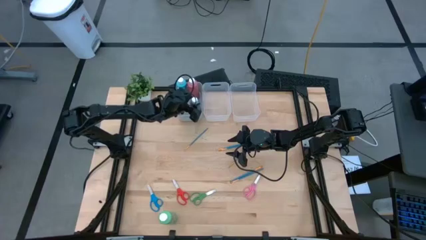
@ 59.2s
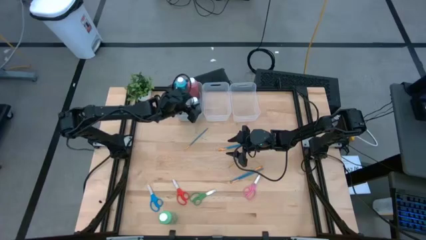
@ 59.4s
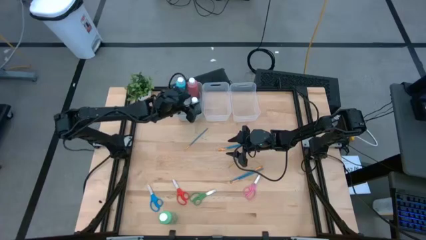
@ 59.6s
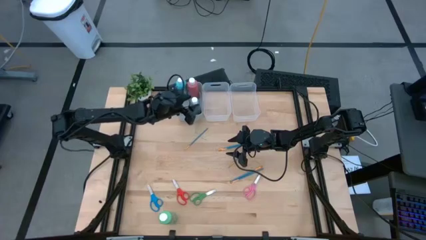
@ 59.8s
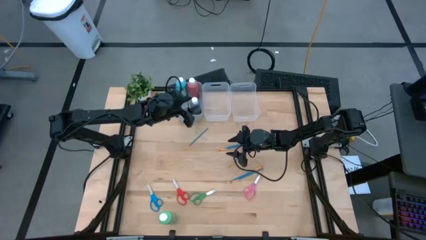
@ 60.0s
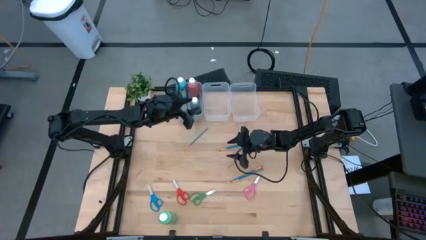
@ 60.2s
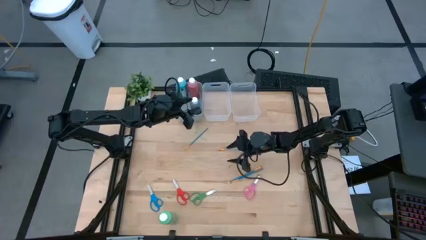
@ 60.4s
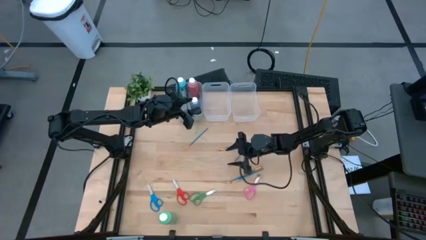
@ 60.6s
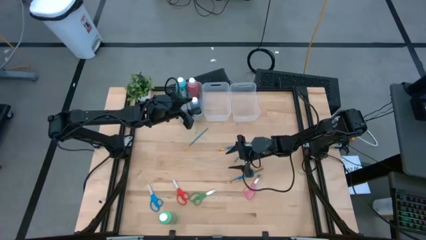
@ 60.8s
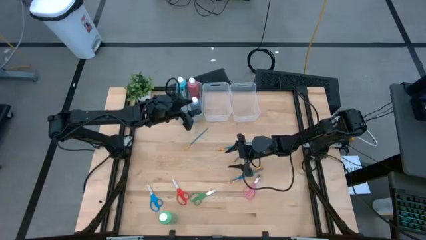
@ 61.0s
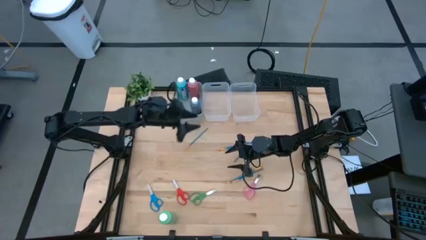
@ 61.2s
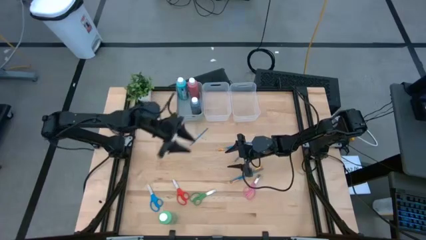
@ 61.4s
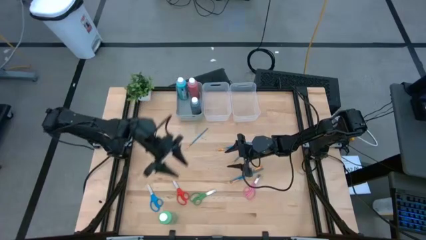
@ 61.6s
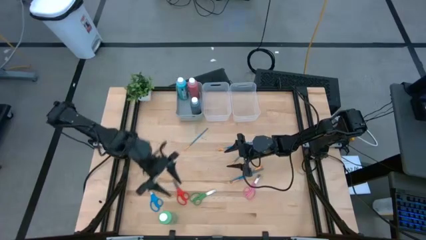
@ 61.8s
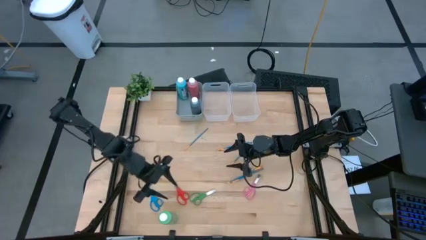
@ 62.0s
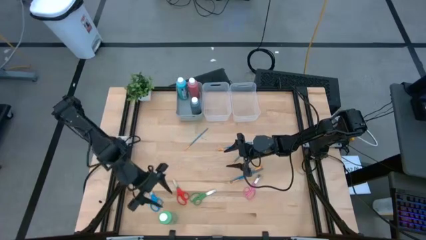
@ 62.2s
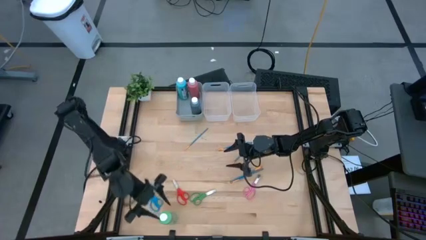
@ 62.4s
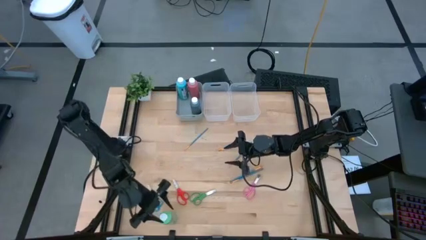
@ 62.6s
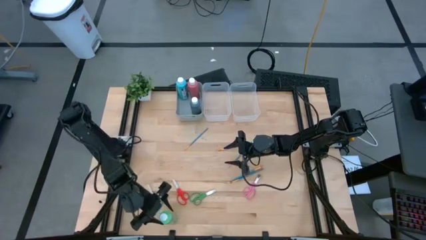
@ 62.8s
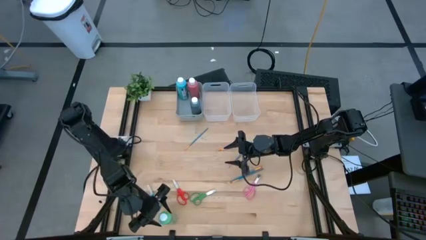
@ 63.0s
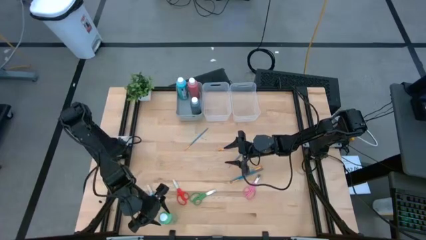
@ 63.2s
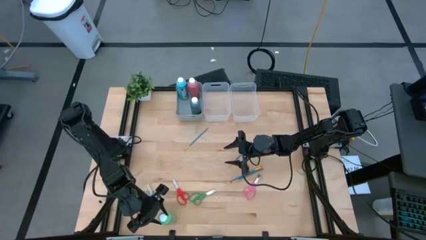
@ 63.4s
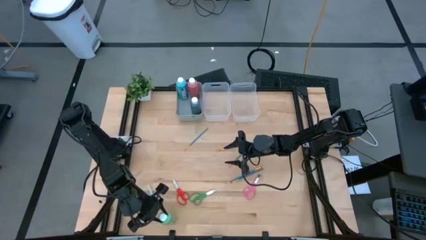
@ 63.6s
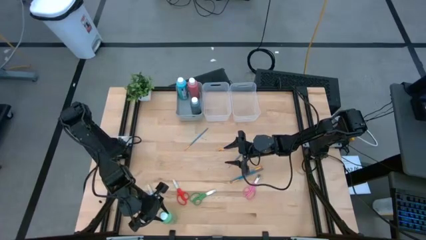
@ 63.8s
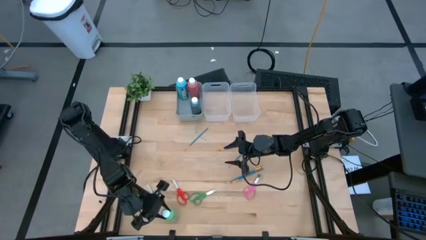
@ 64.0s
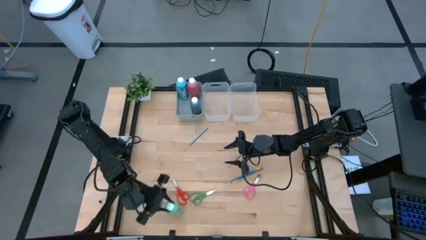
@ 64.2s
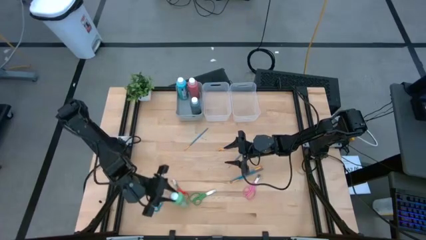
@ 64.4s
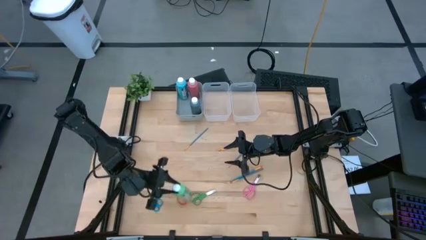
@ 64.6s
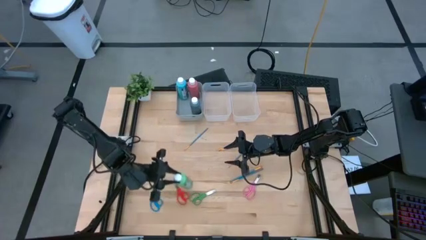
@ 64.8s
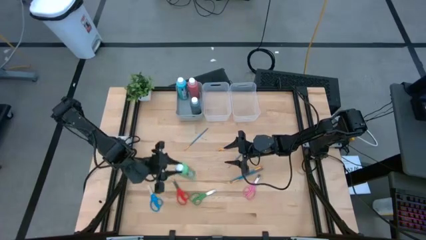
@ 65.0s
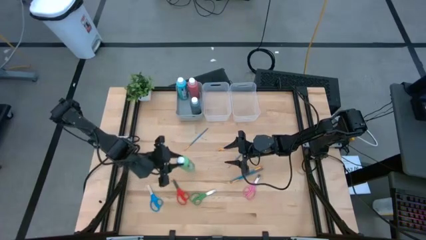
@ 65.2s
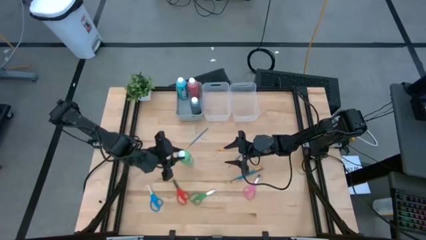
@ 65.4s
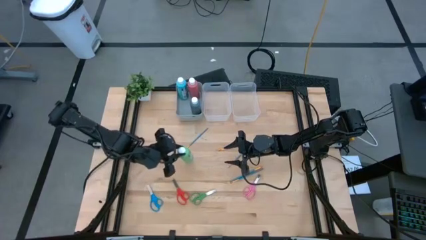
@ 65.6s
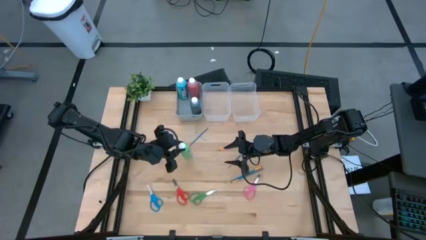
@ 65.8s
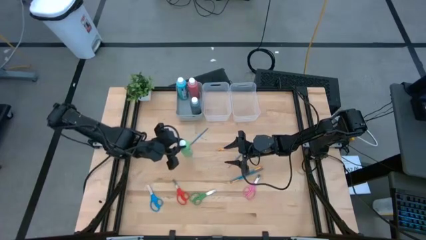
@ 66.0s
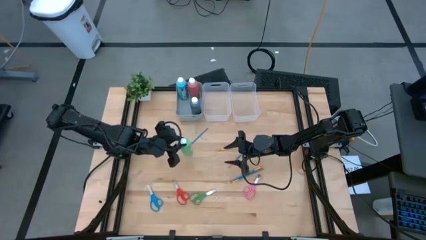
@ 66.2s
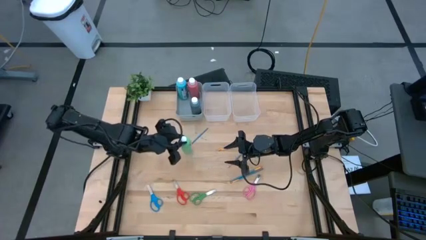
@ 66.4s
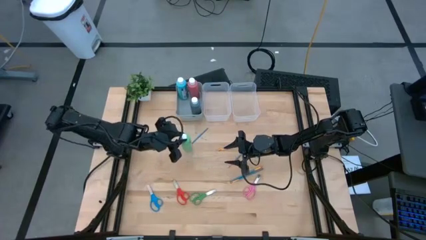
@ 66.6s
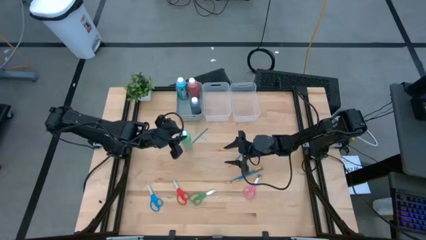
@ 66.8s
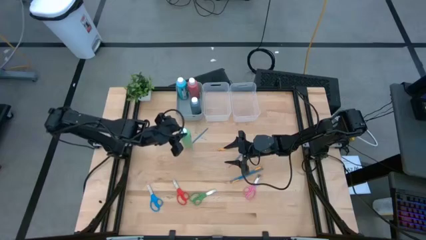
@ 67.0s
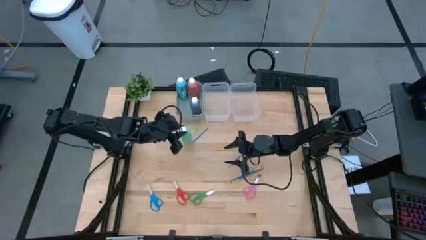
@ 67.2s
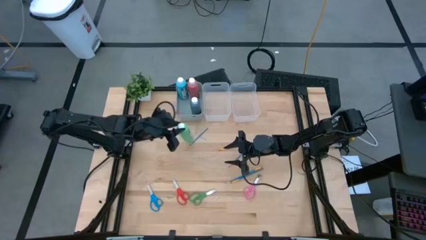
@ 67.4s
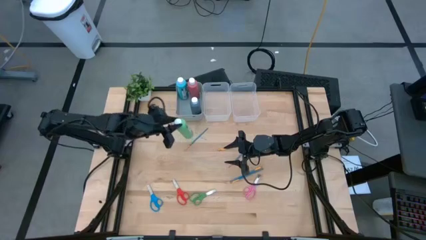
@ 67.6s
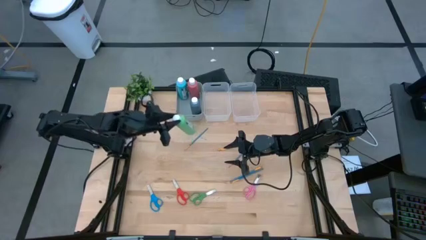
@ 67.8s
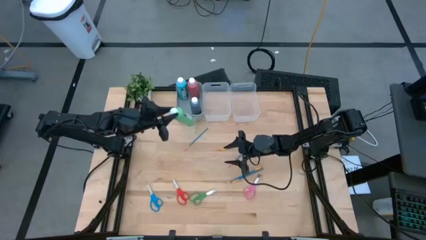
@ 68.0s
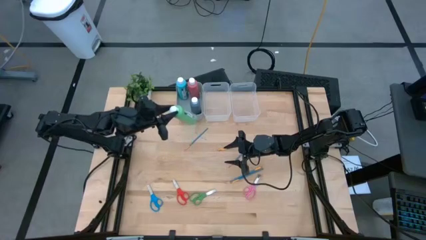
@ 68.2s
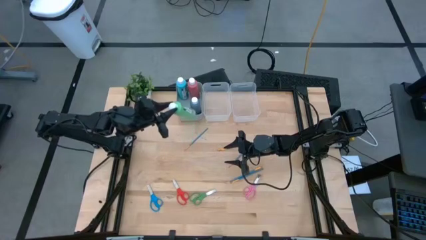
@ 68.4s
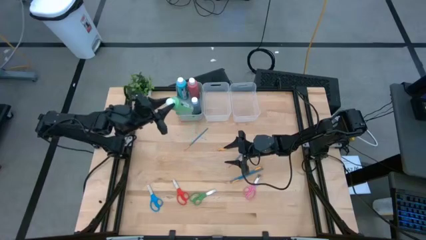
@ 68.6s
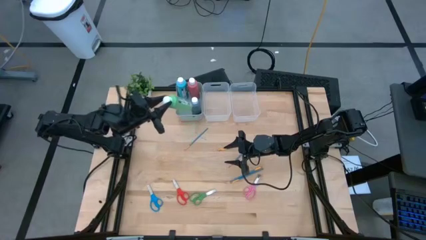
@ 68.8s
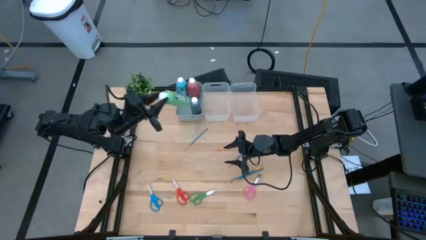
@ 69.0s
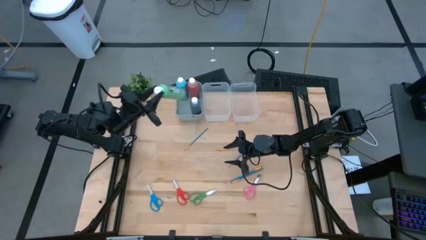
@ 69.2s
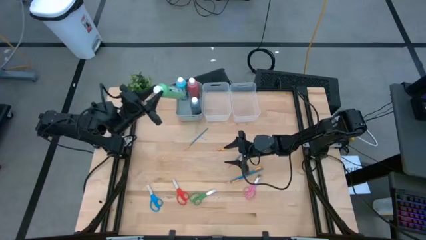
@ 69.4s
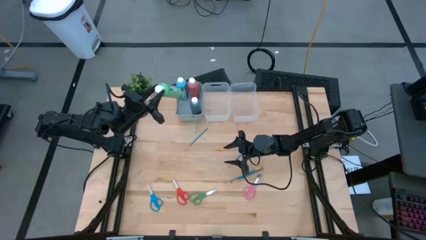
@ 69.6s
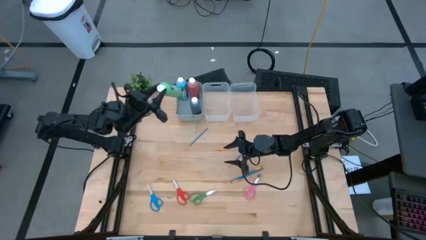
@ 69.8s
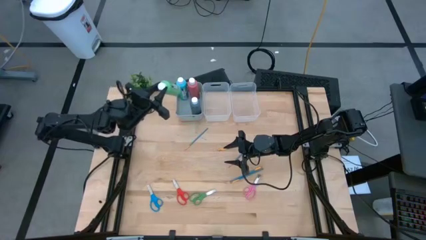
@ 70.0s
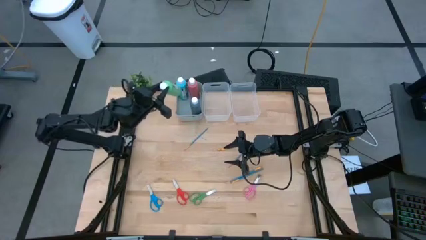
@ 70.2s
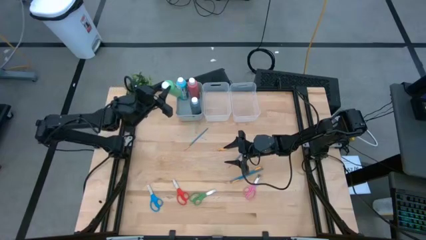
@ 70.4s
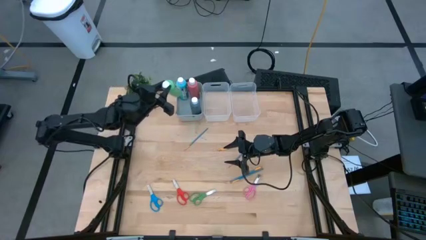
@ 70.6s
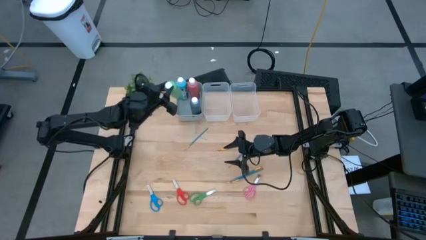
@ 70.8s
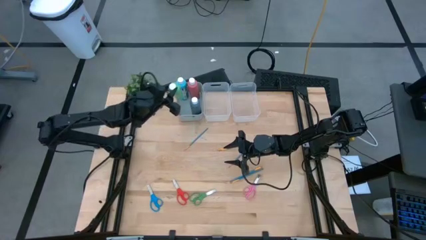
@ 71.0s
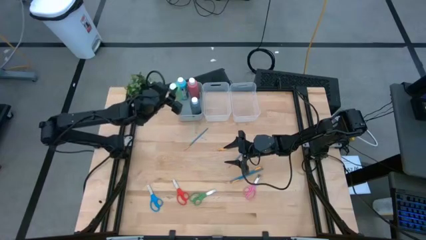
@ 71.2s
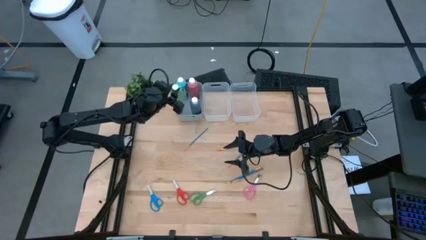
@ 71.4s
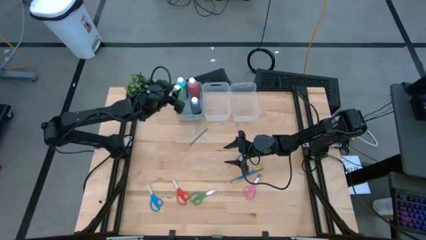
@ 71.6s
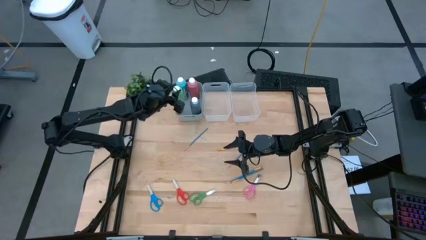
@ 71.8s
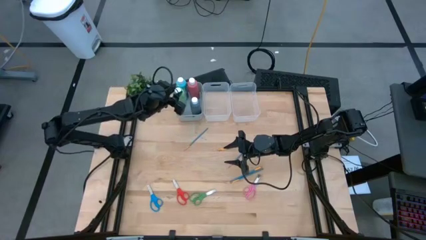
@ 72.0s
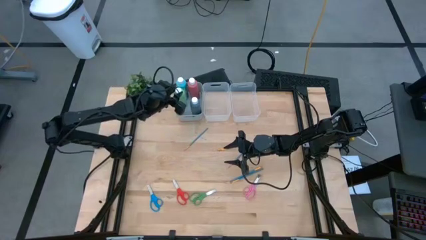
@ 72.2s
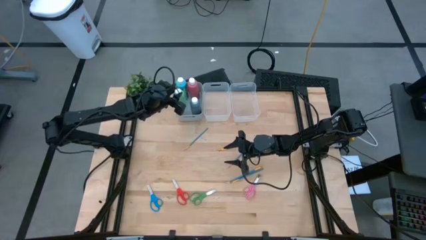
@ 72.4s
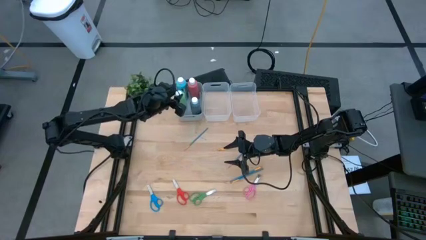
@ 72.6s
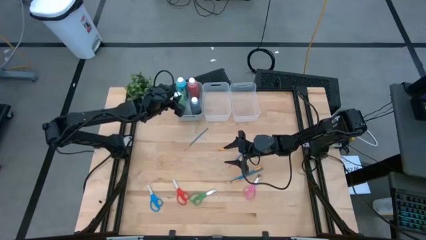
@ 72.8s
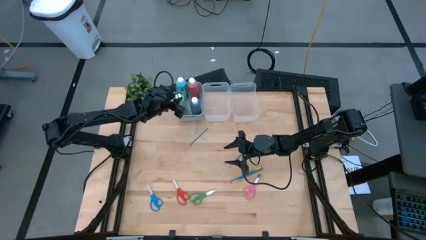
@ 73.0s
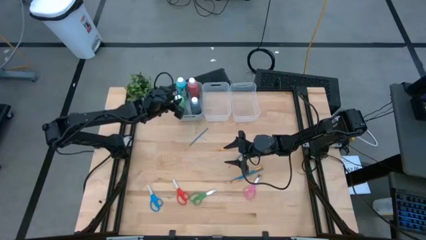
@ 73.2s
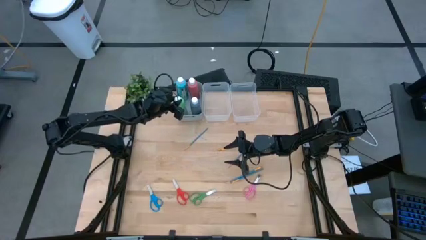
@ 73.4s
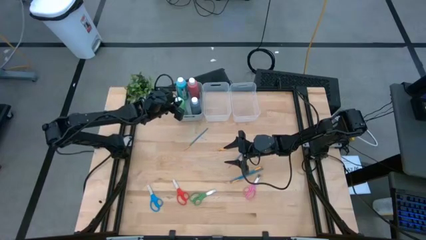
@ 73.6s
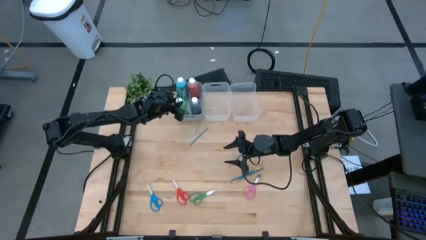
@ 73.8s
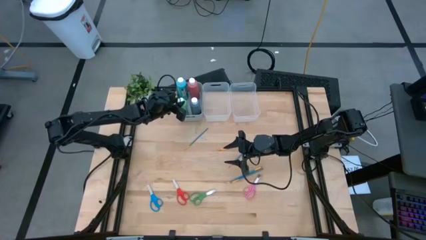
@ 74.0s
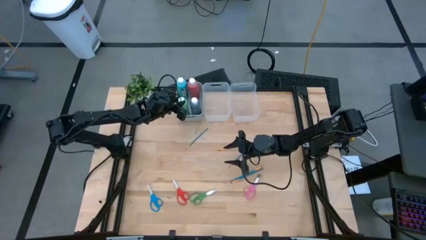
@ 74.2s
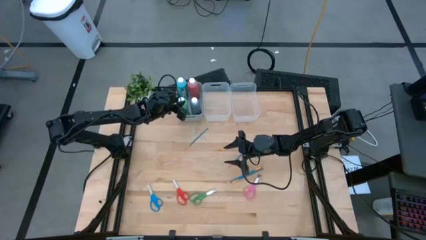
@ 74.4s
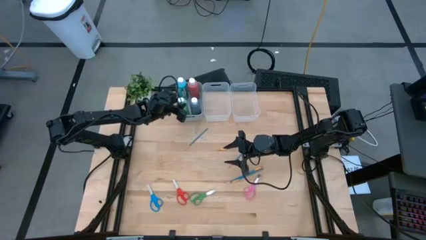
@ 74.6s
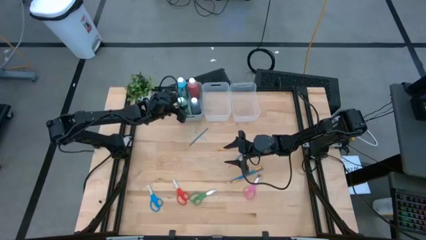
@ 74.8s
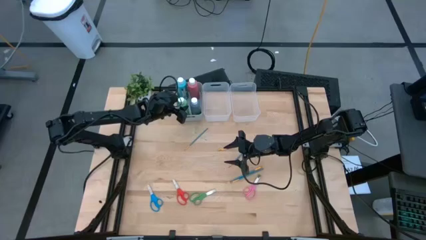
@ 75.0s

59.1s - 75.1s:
Task: Pick & Place Paint Supplies
Put the green paint bottles into the gray bin
